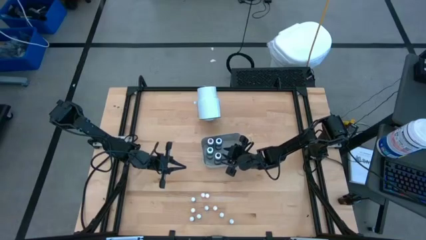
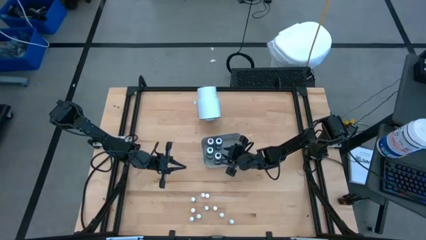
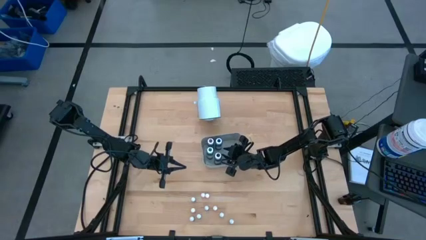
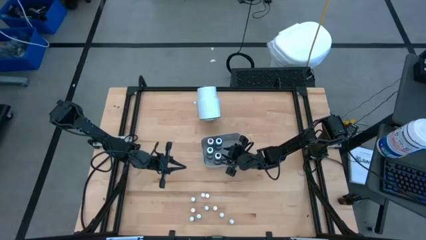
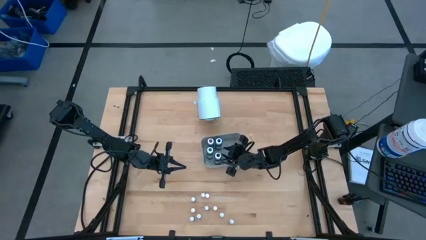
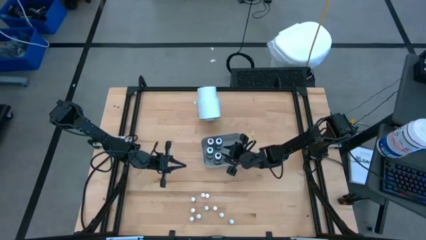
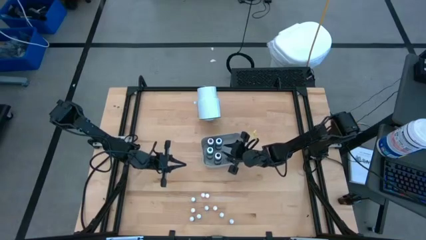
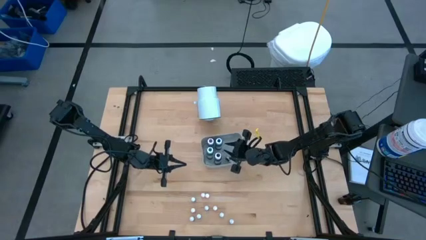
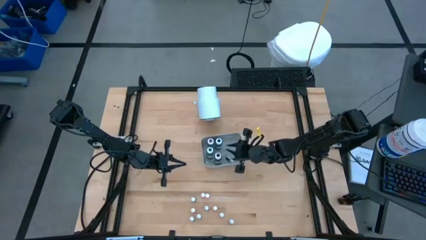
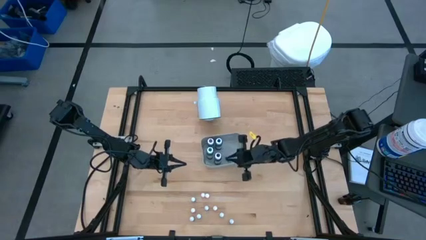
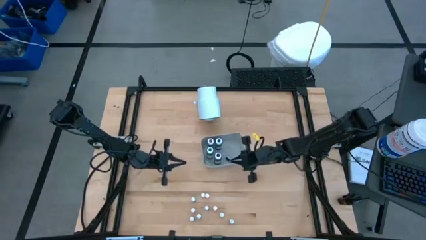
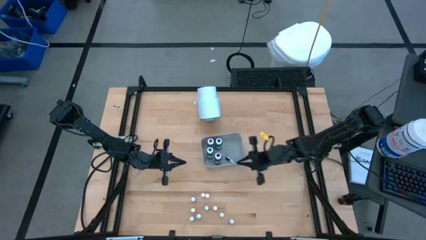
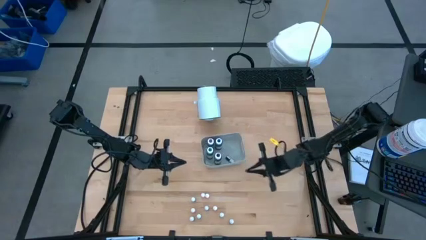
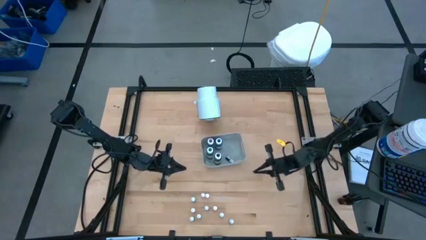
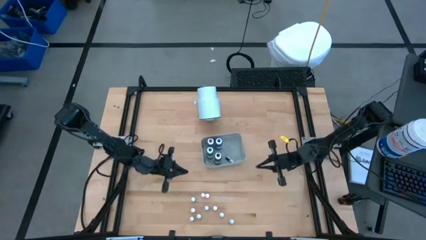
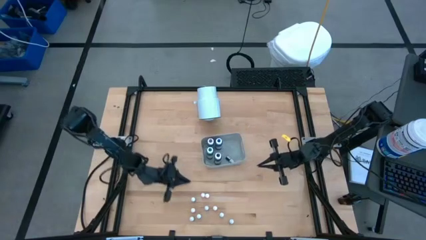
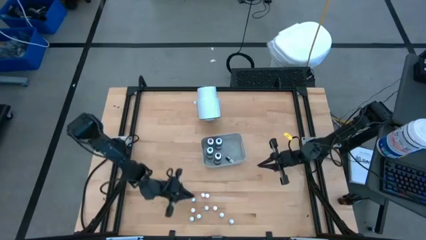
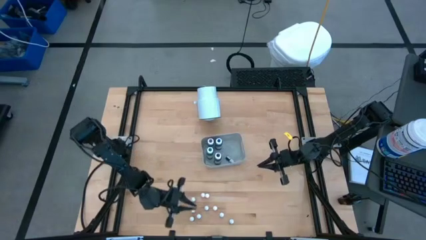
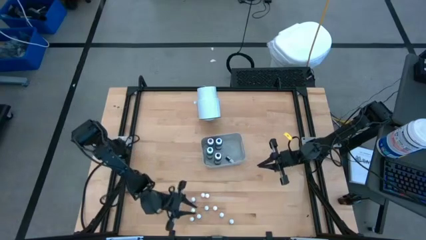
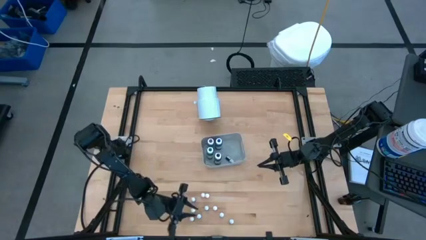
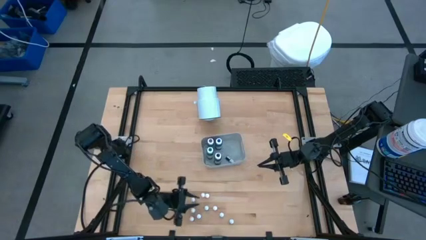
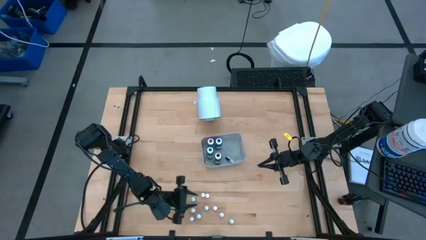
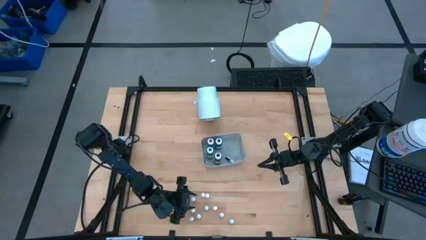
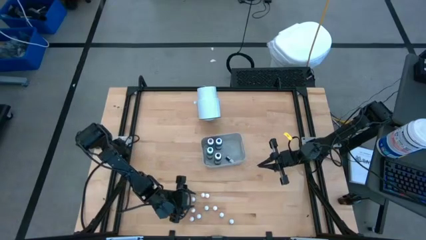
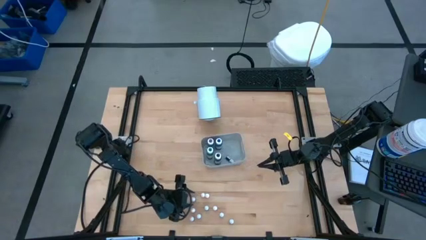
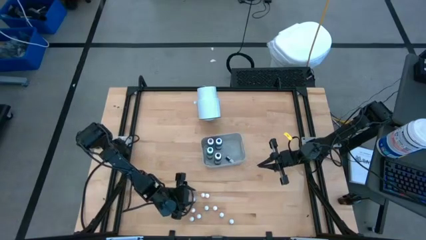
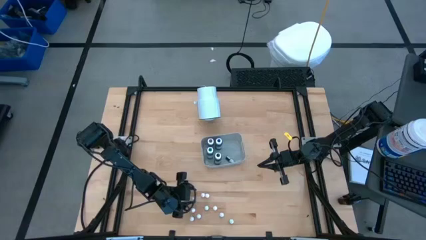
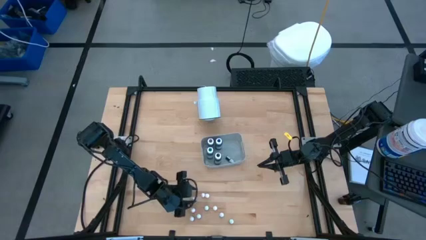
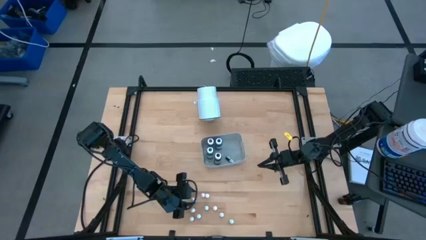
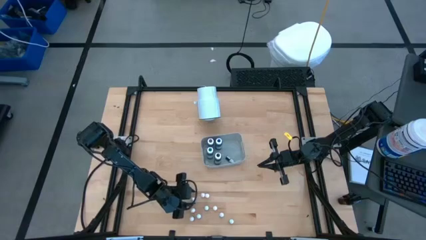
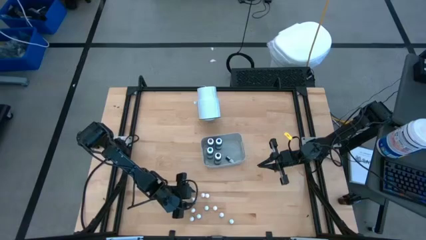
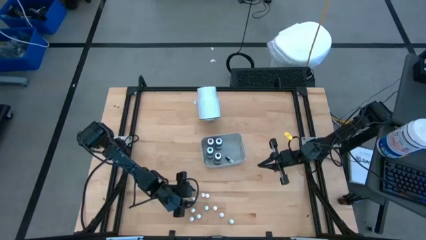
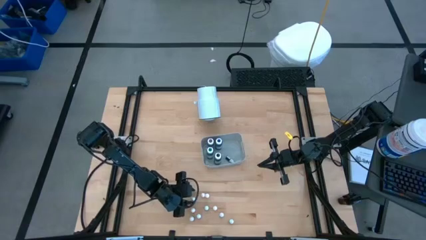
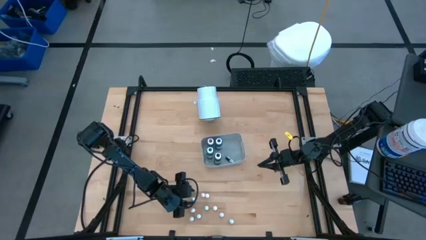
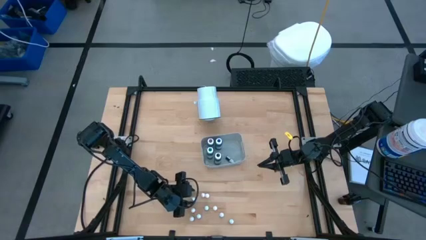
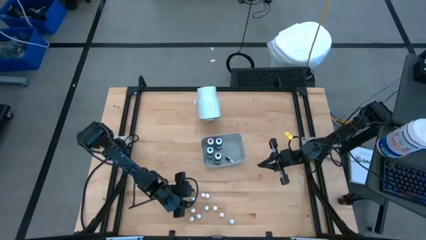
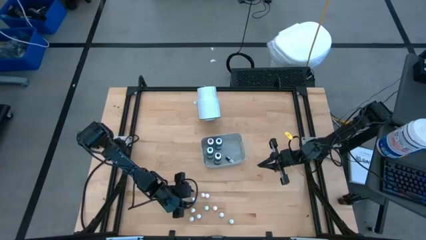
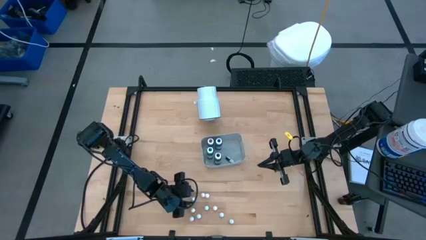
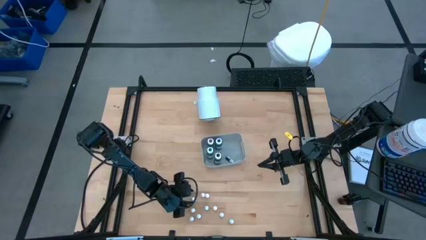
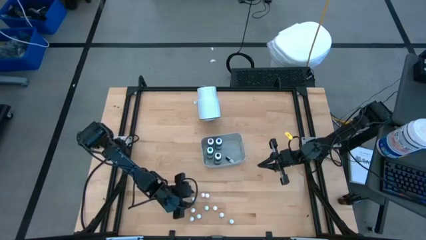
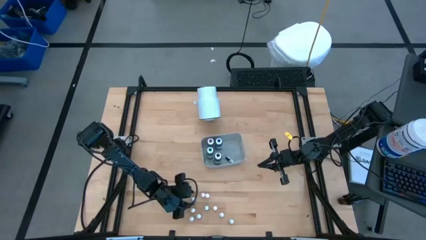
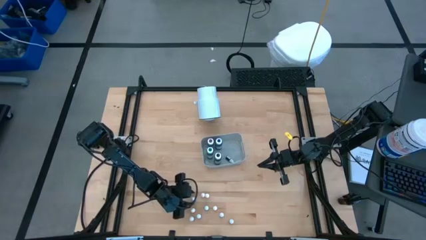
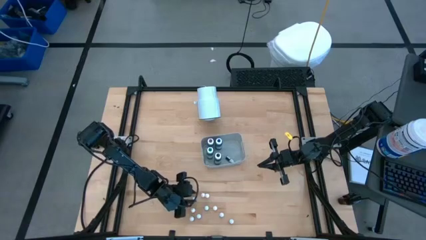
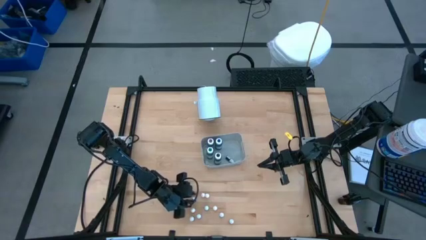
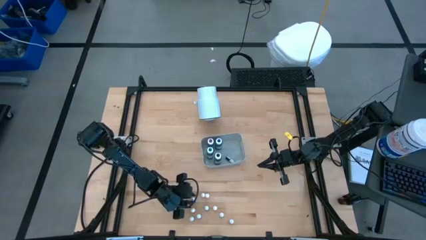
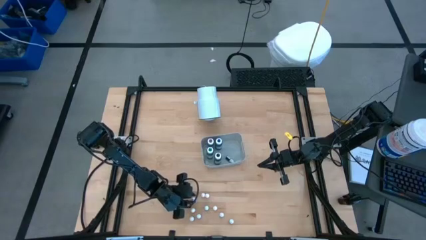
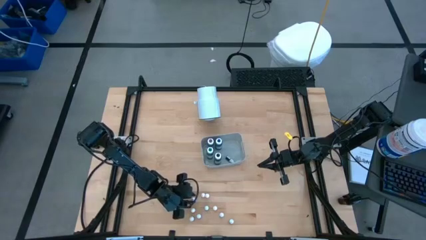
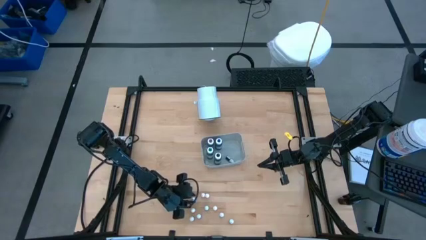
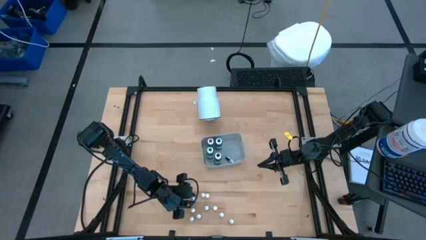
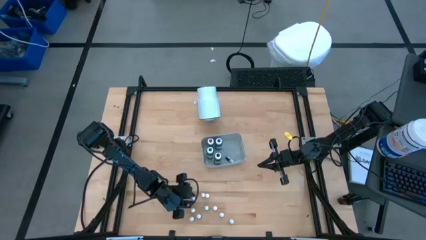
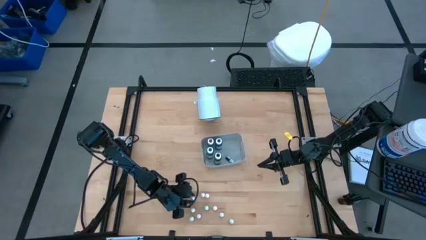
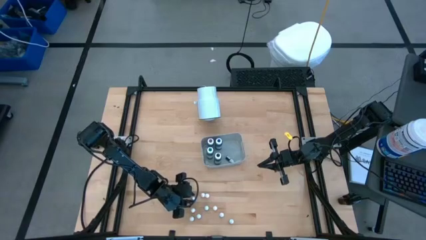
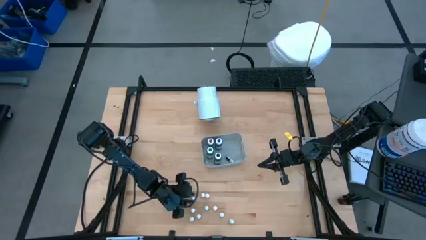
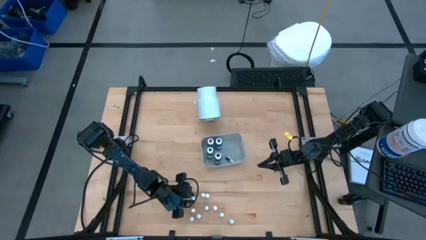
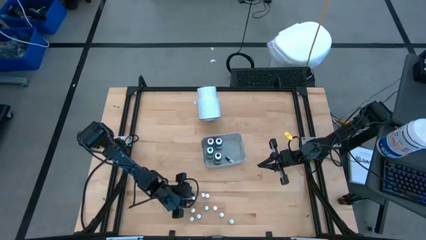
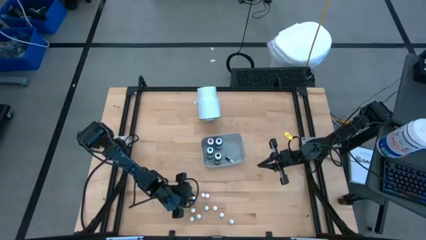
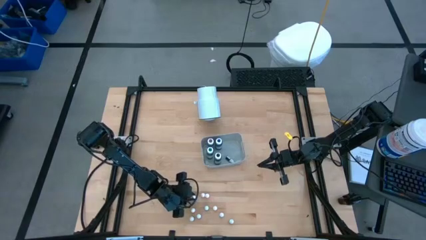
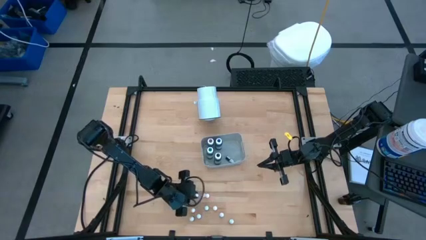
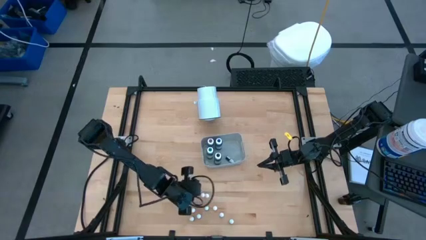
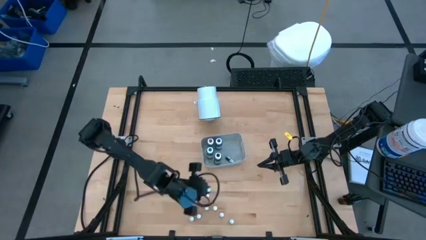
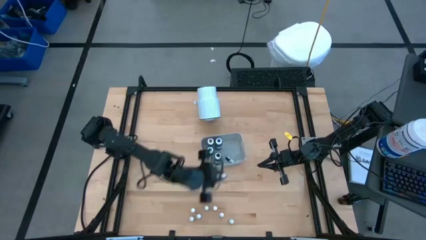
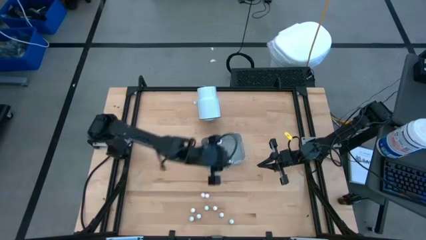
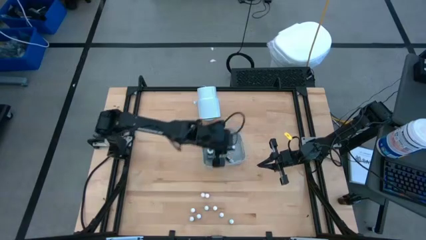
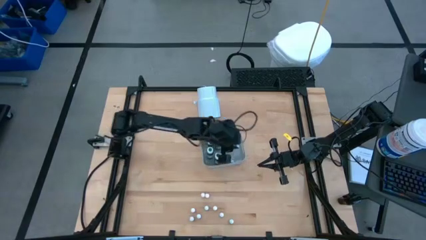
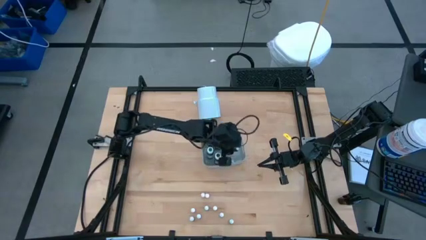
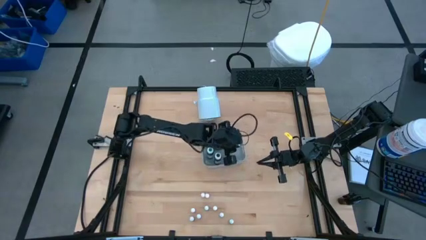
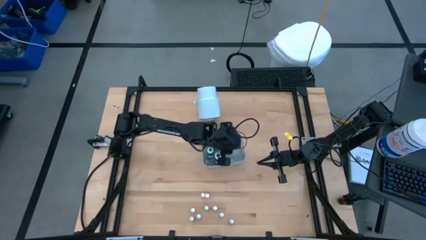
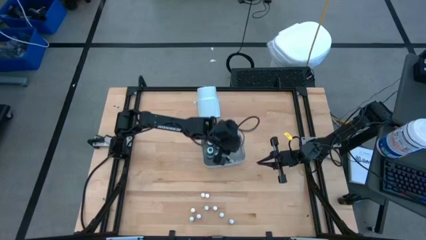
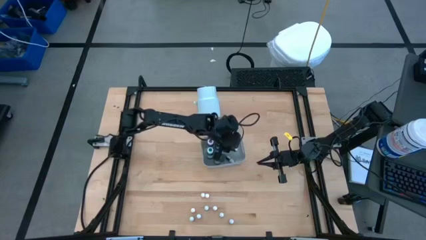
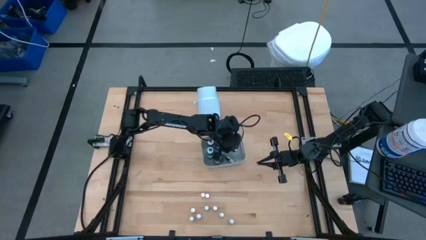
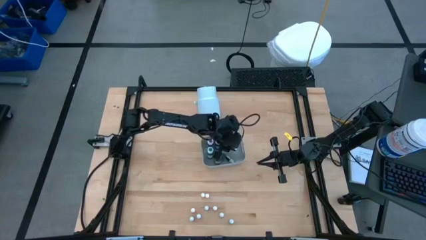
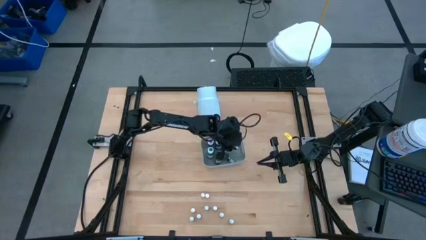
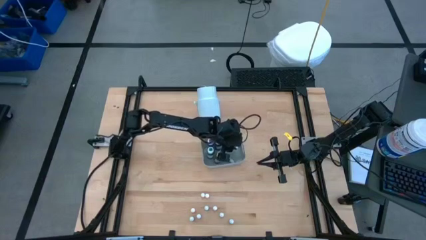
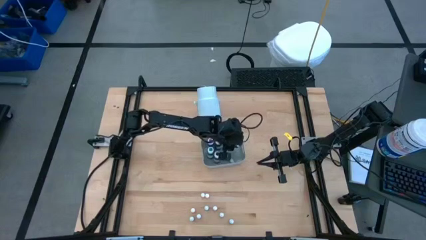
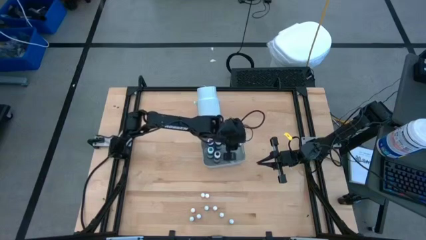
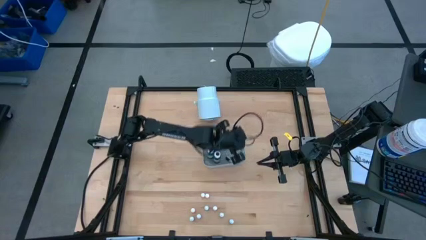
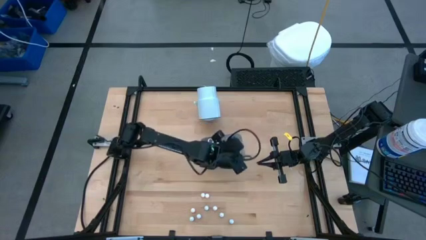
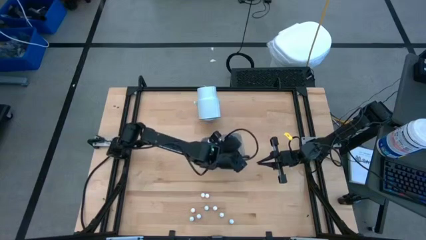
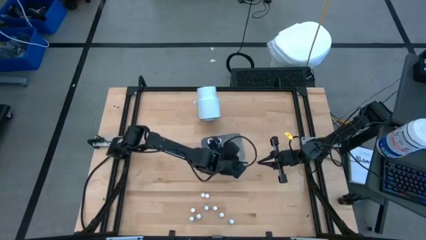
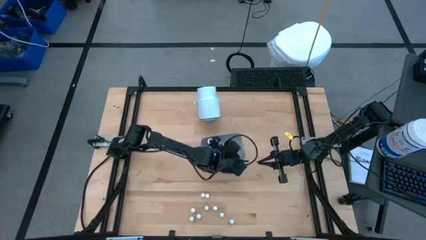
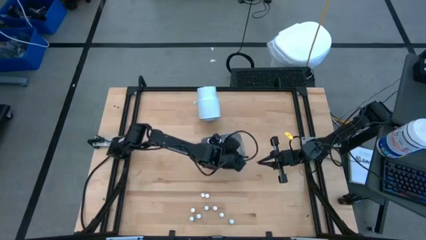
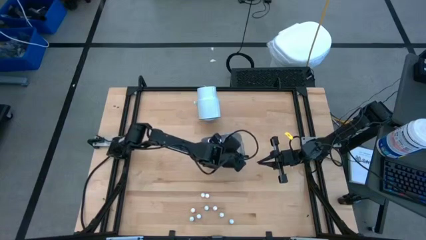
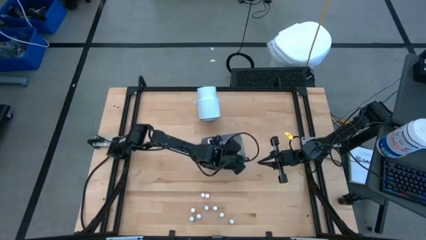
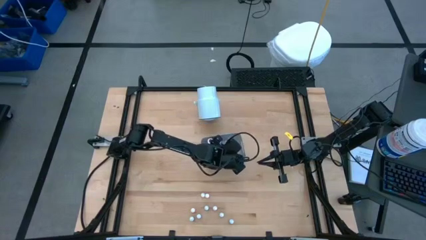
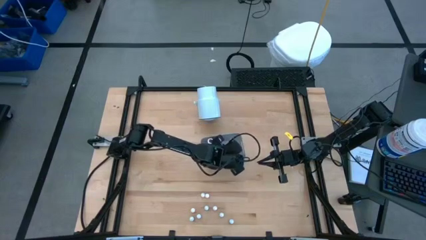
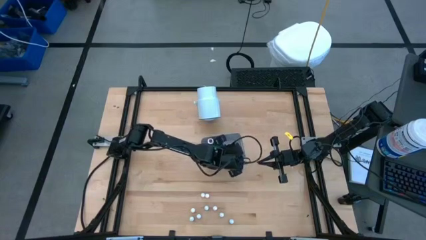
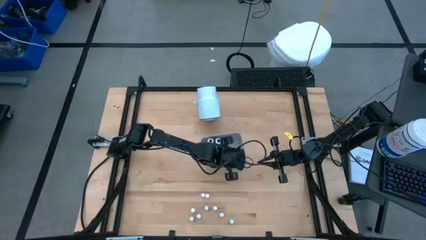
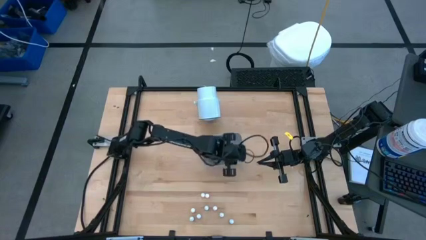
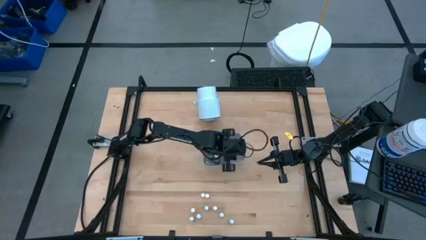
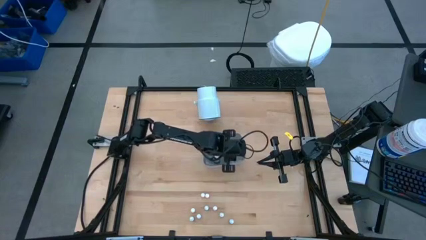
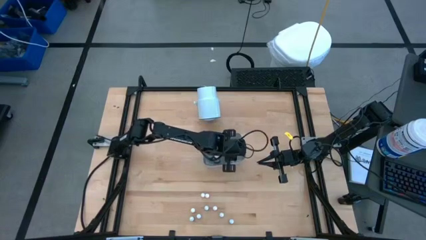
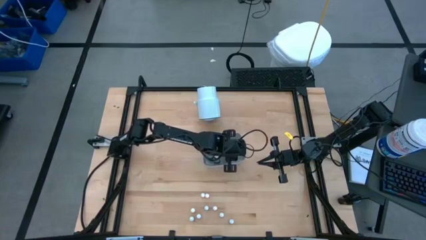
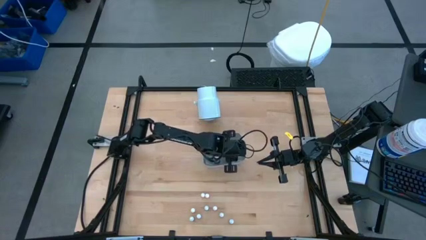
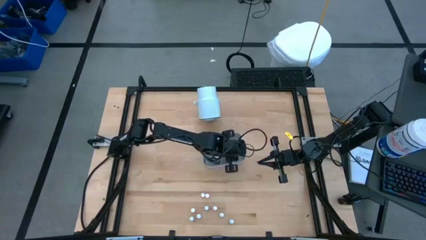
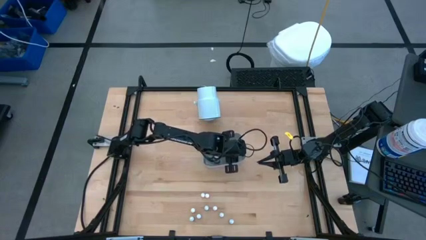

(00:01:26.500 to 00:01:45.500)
Task: Pick & Place food coloring
Put the red food coloring bottle into the gray bin
